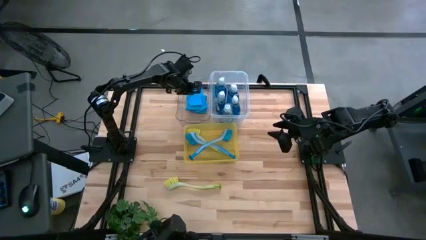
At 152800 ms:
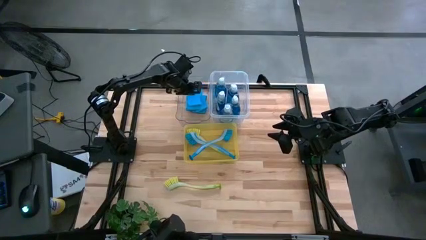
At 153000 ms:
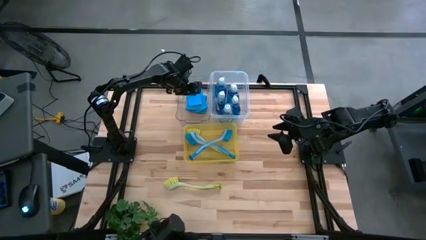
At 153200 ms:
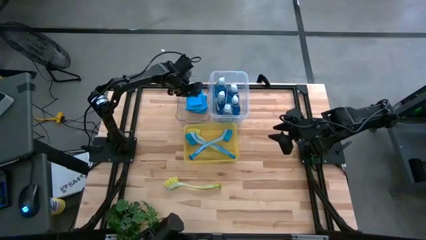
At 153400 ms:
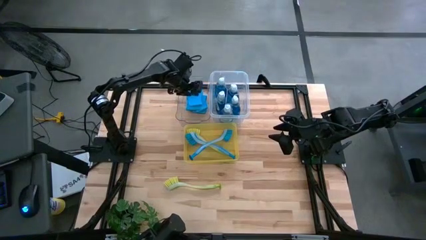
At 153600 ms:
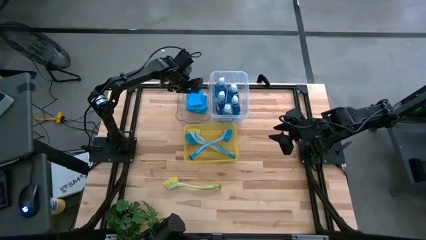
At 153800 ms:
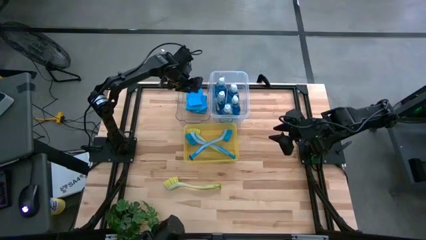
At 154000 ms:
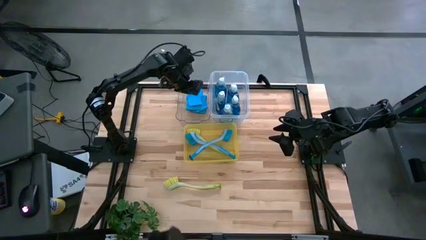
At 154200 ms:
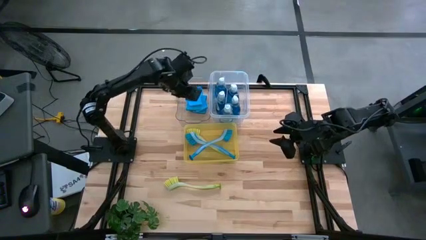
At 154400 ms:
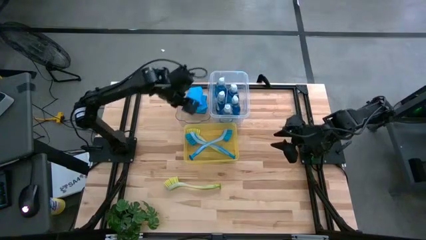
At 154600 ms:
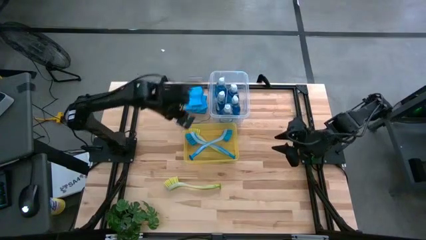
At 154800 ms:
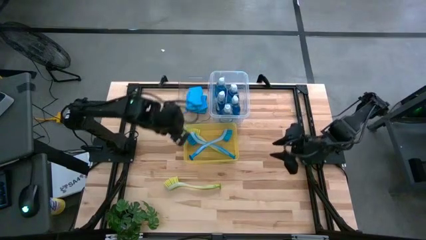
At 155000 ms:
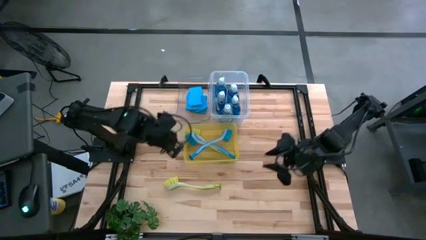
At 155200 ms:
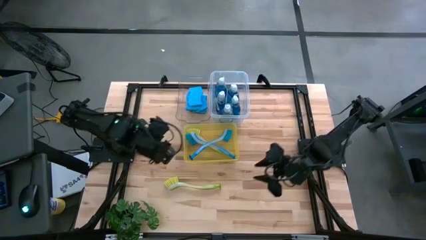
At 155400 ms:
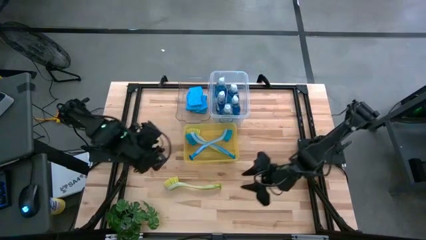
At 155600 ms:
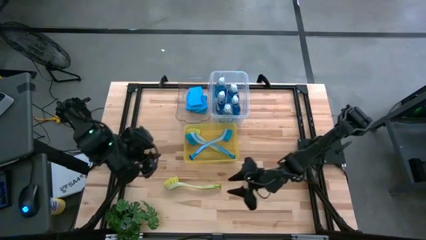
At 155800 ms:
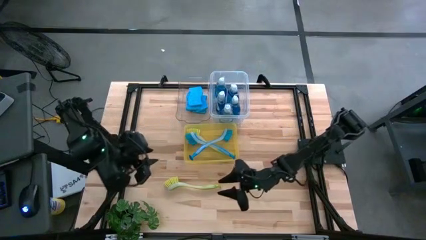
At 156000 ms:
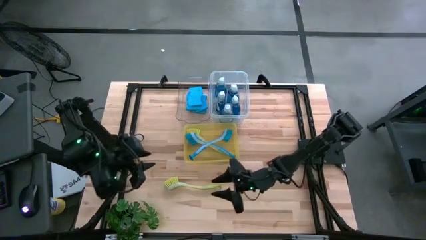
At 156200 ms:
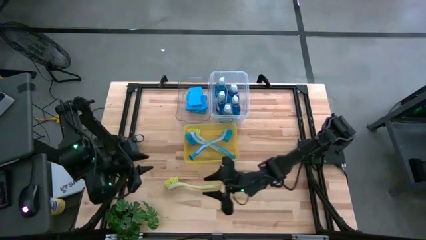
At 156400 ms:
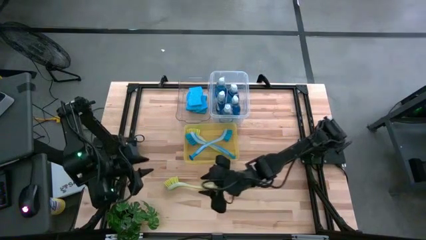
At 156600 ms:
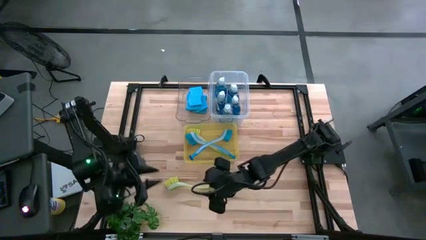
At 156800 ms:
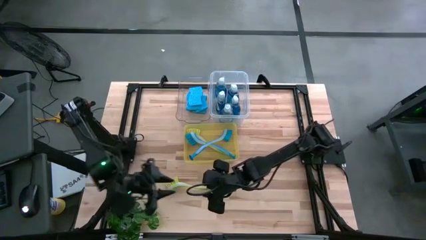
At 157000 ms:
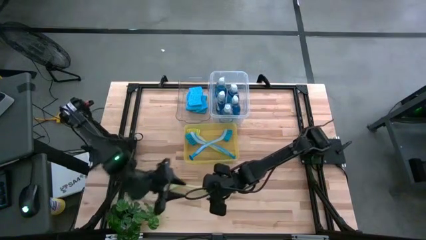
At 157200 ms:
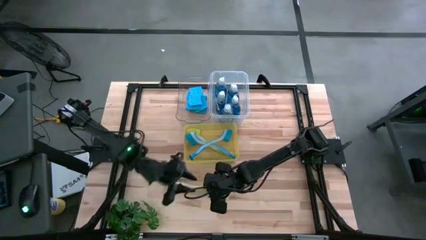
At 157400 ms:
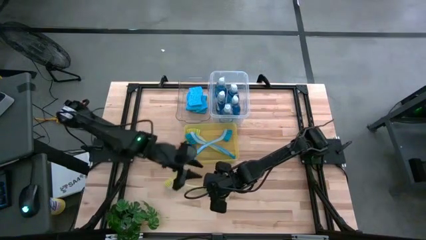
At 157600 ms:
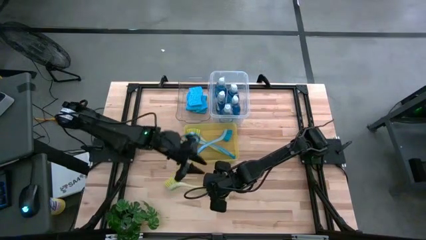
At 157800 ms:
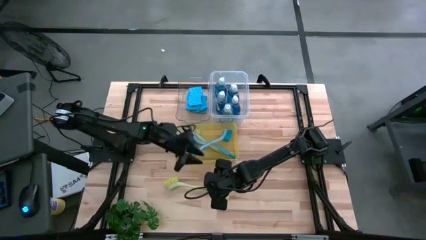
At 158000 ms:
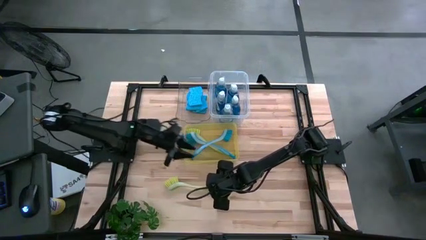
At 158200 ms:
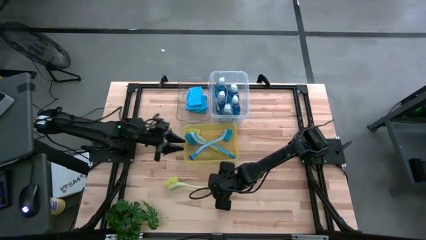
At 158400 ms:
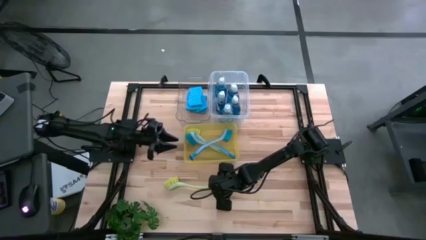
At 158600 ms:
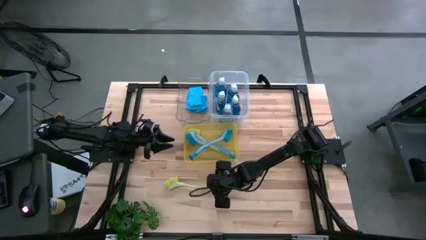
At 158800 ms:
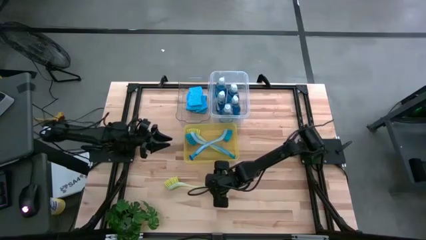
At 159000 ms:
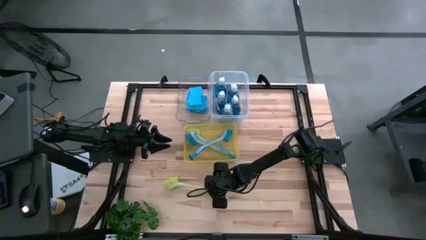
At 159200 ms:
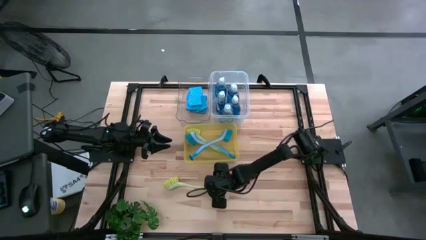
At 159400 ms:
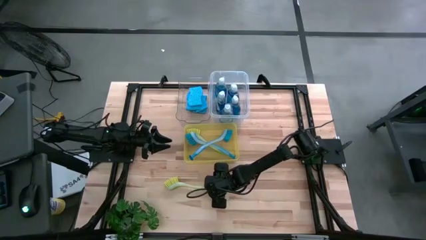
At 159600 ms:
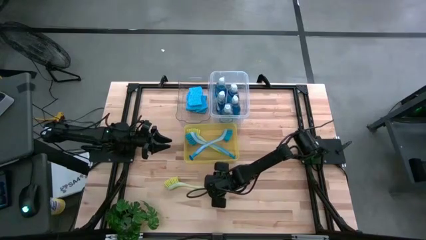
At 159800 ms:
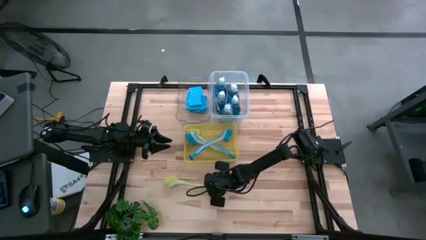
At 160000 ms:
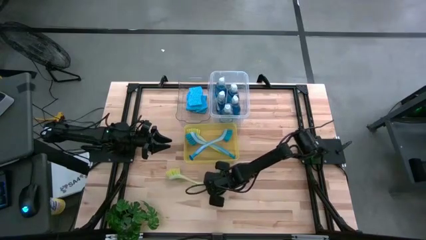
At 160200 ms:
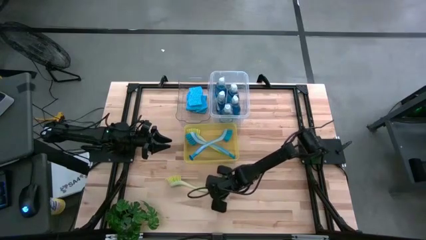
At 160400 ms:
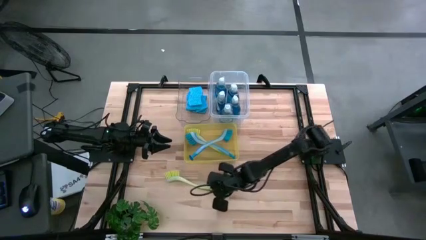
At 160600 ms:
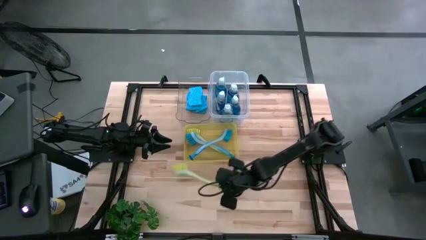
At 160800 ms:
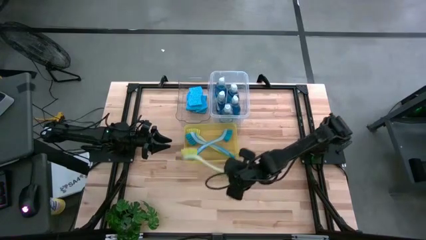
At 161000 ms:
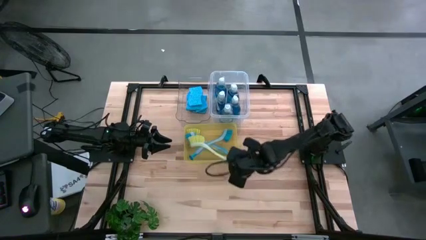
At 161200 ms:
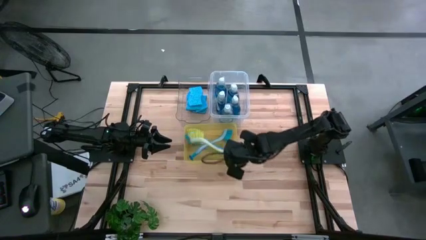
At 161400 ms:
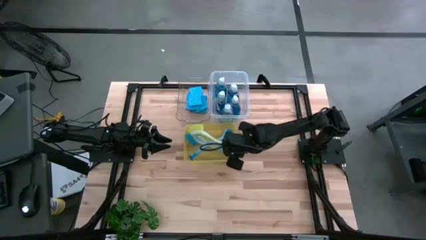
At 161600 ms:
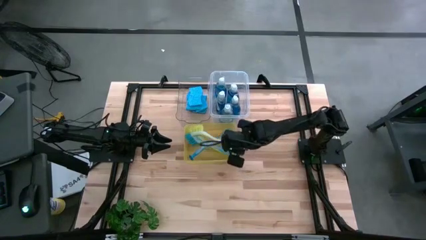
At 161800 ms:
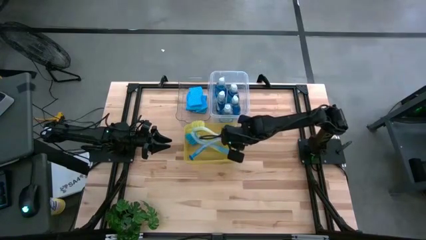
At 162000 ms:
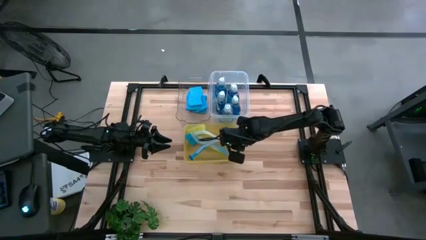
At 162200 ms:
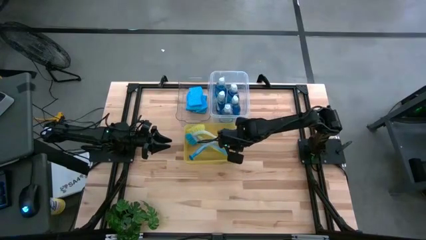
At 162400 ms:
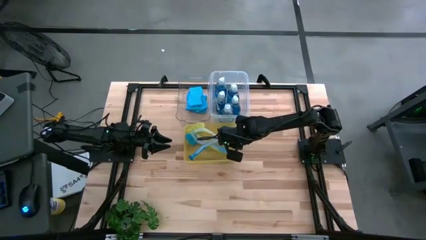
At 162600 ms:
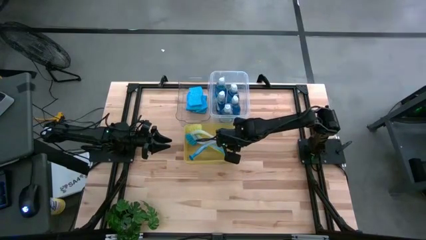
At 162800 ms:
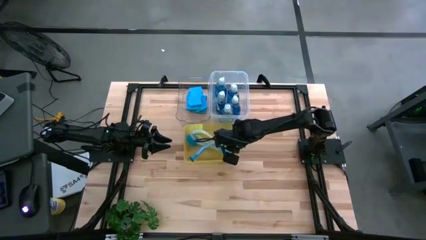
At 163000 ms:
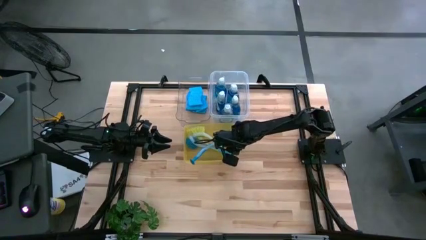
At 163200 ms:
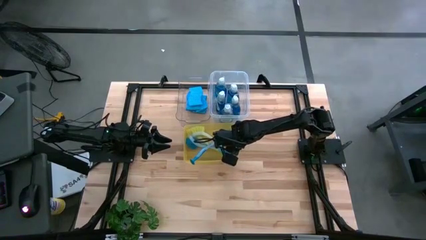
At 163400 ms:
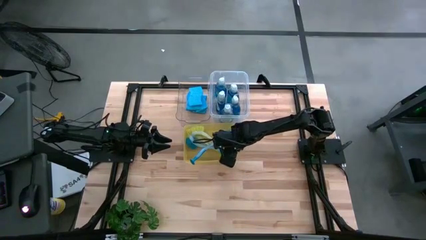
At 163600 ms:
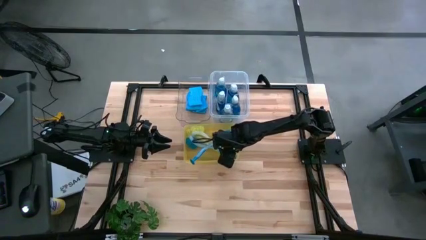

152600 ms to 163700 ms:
Task: Pick & Place Kitchen Sink Supplies
Put the yellow toilet brush into the yellow bin

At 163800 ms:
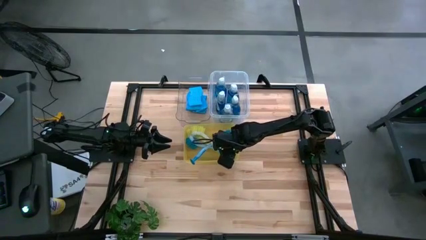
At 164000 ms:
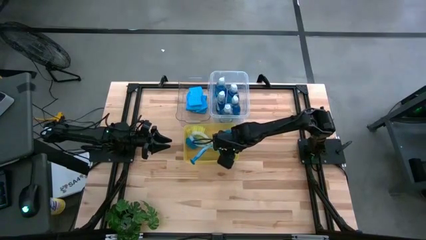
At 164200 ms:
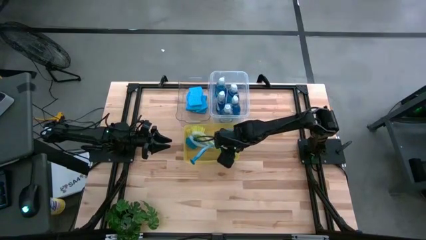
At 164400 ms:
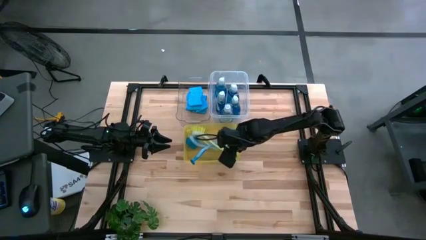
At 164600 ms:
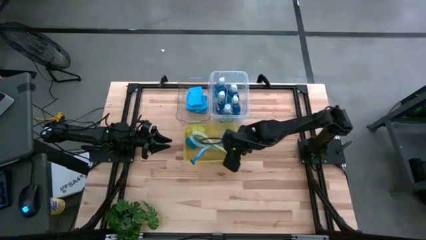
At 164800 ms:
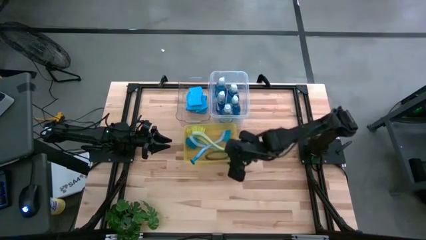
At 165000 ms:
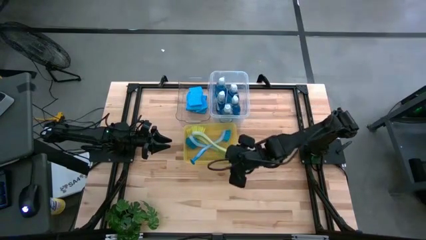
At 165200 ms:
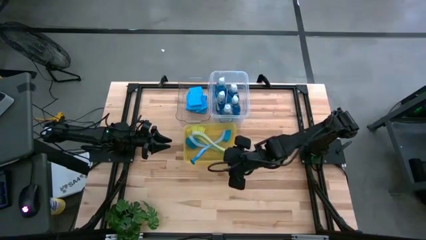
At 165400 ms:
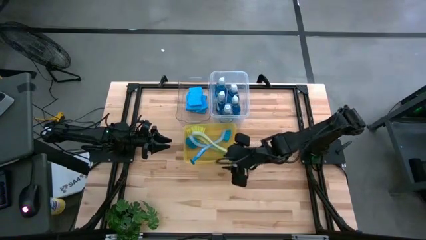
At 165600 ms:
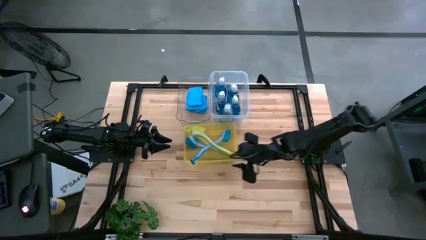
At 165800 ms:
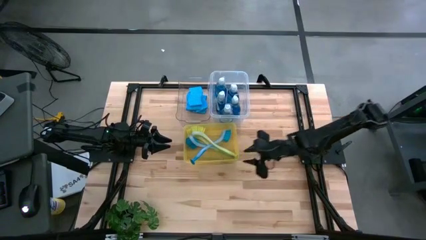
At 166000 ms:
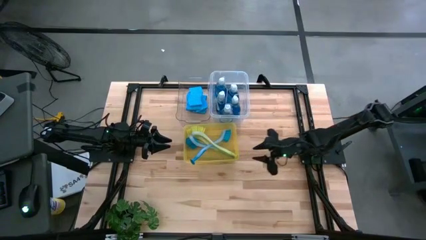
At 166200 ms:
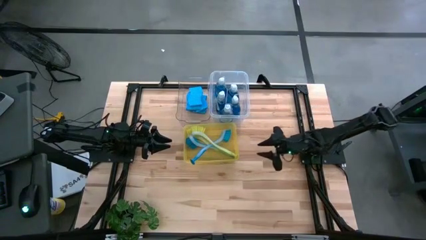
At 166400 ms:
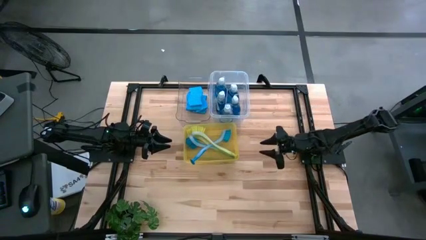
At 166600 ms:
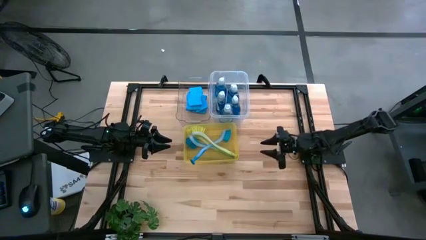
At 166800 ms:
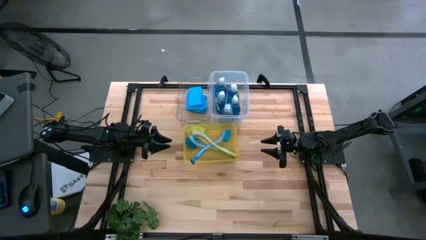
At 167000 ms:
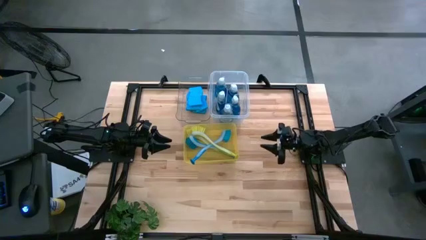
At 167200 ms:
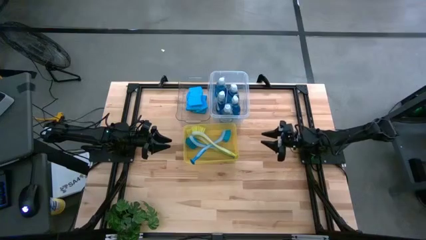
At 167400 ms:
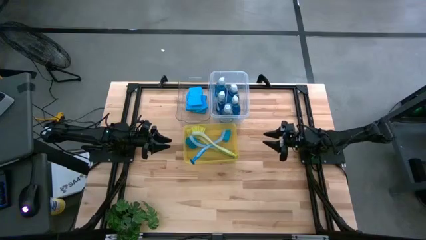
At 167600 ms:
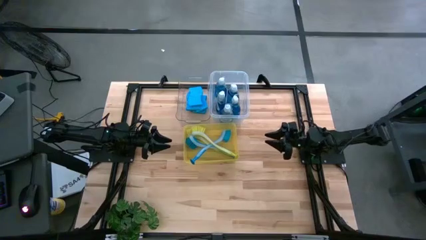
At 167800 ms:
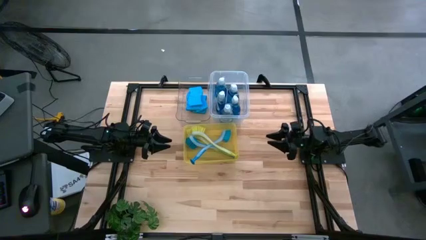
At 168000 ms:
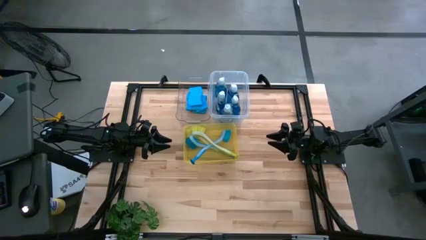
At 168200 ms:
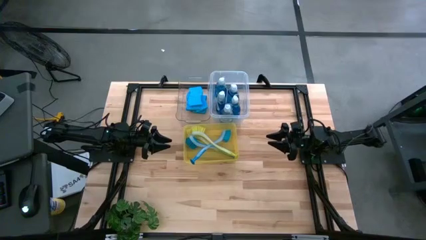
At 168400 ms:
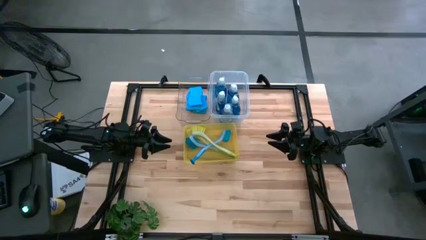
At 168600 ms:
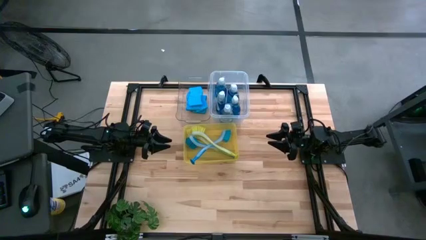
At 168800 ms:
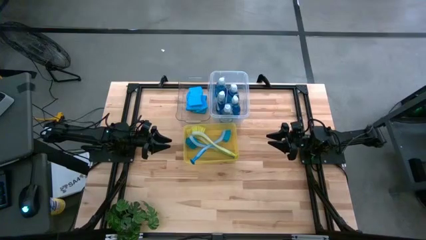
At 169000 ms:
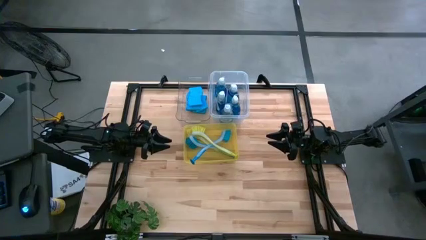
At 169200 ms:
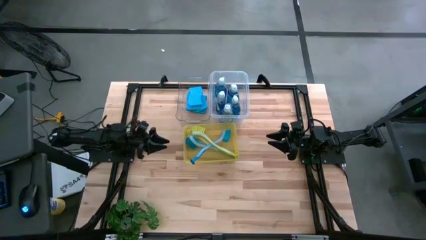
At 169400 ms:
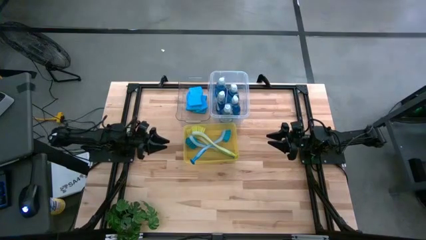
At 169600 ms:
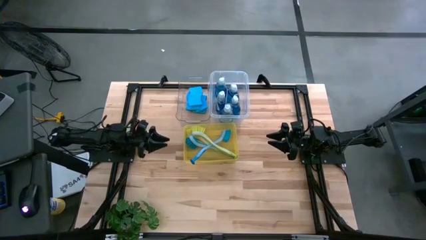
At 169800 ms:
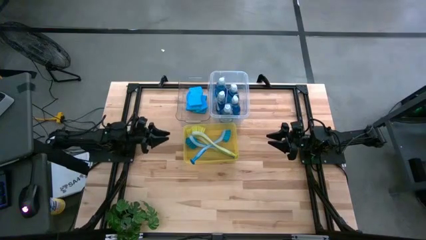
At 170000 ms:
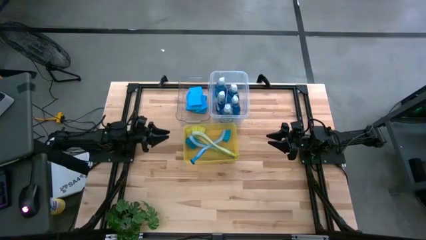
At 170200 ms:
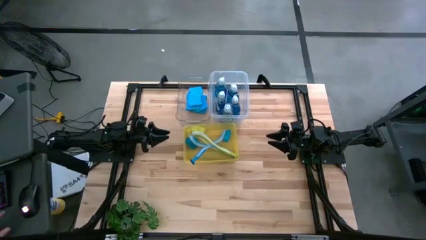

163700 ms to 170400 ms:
Return to Home Position
